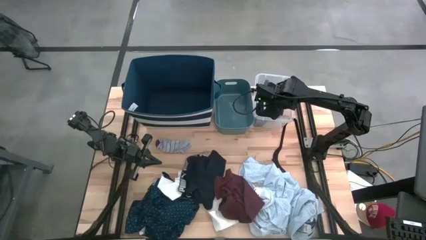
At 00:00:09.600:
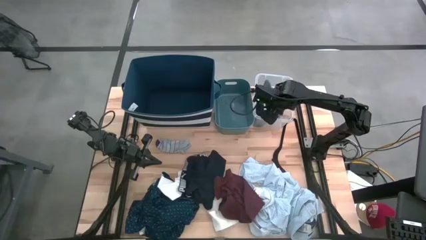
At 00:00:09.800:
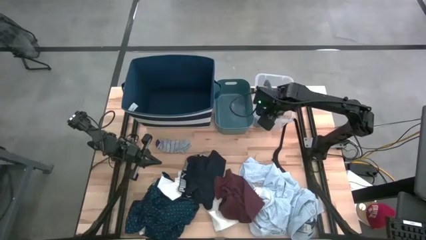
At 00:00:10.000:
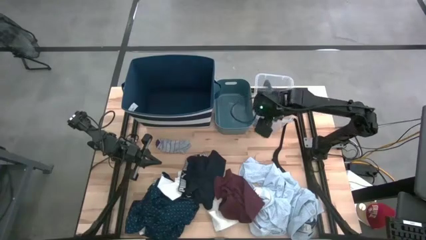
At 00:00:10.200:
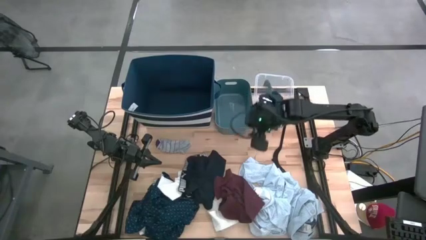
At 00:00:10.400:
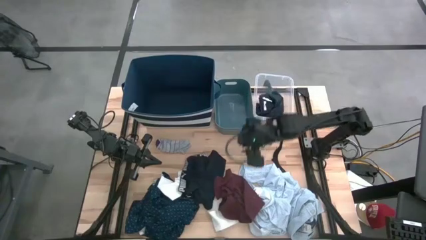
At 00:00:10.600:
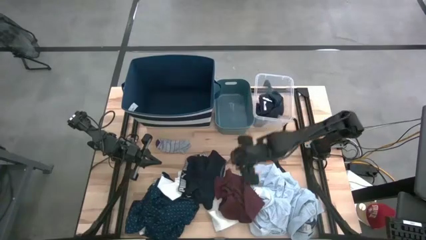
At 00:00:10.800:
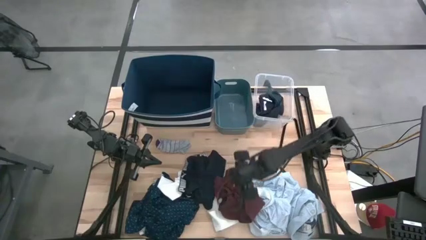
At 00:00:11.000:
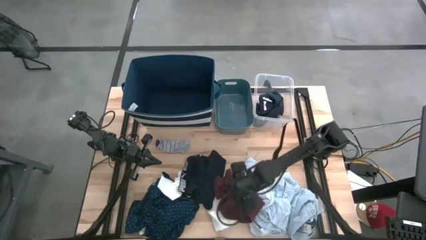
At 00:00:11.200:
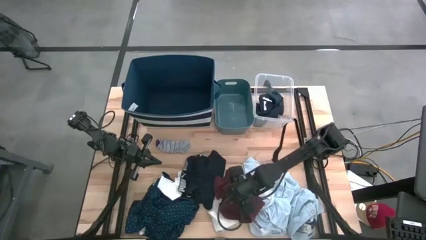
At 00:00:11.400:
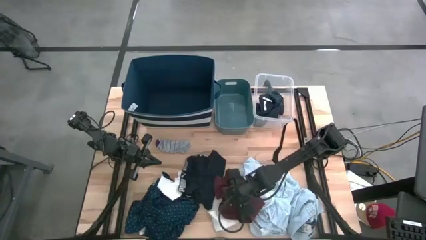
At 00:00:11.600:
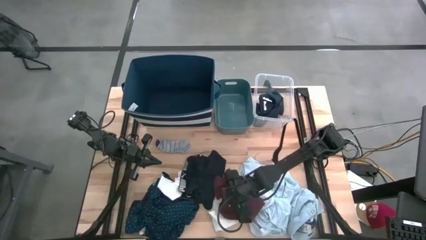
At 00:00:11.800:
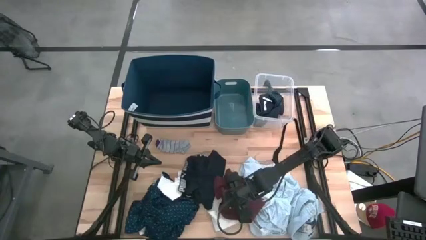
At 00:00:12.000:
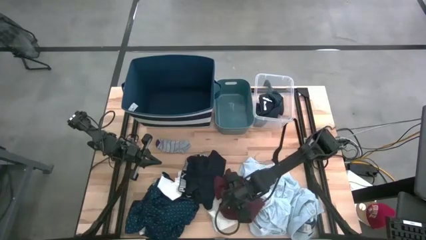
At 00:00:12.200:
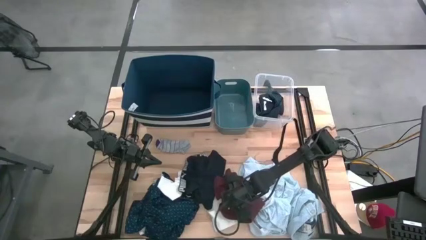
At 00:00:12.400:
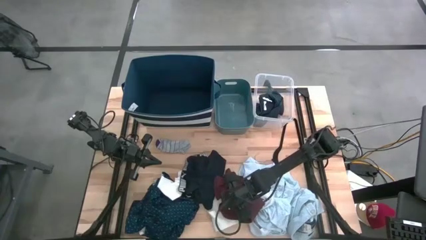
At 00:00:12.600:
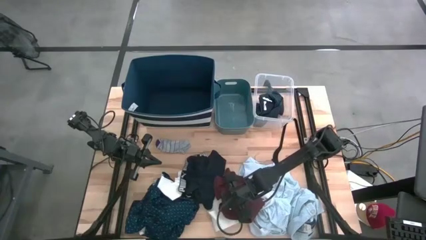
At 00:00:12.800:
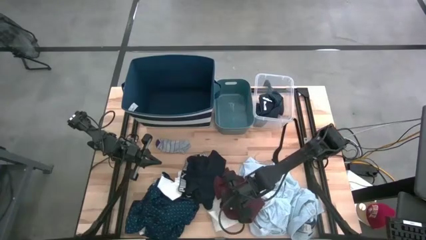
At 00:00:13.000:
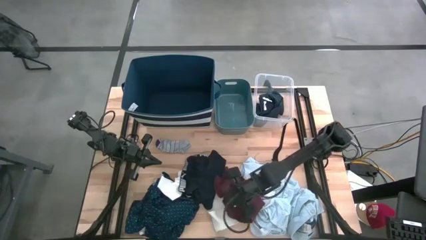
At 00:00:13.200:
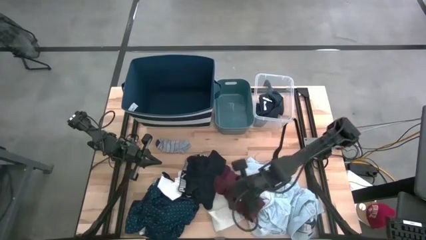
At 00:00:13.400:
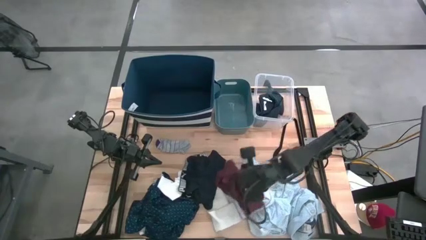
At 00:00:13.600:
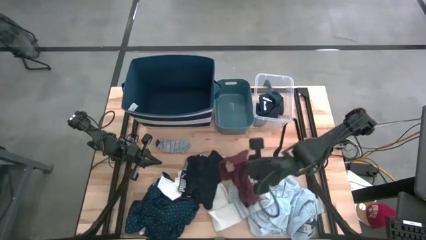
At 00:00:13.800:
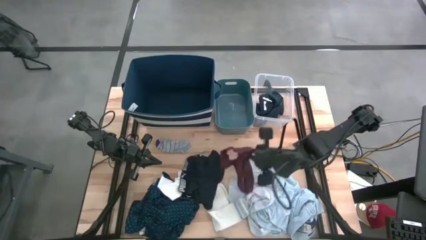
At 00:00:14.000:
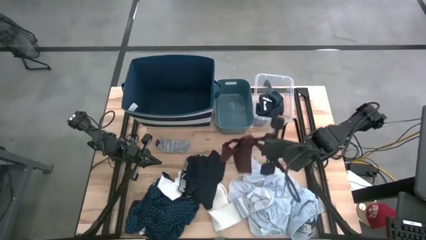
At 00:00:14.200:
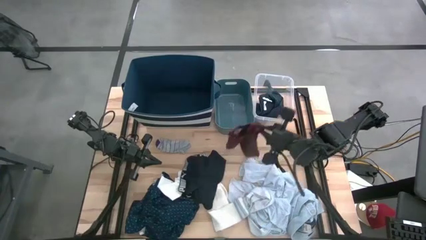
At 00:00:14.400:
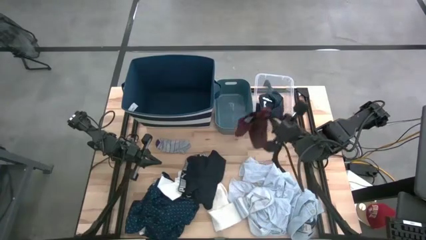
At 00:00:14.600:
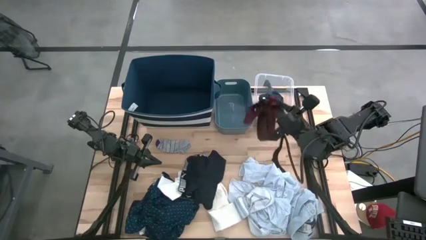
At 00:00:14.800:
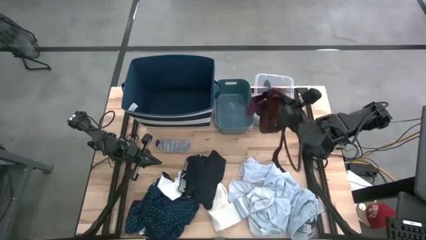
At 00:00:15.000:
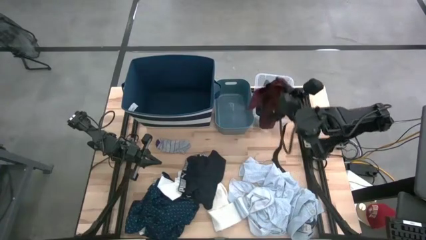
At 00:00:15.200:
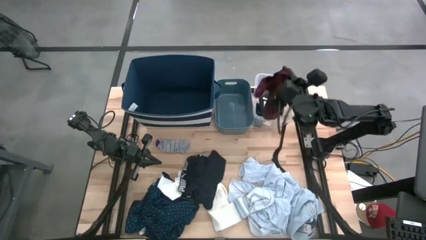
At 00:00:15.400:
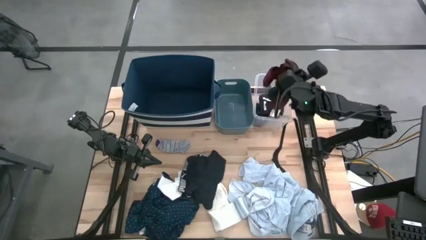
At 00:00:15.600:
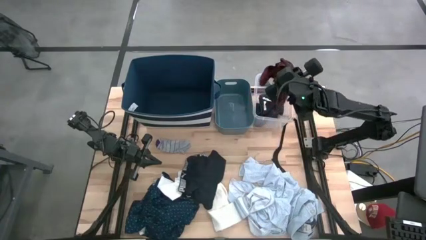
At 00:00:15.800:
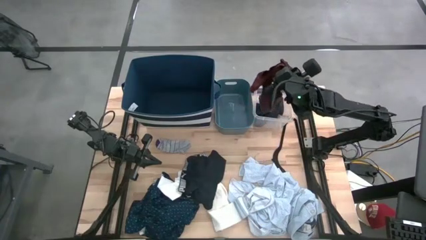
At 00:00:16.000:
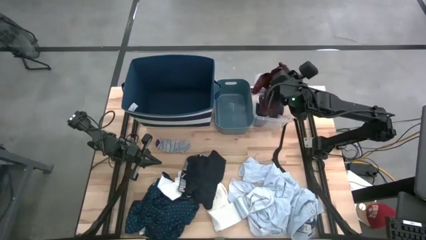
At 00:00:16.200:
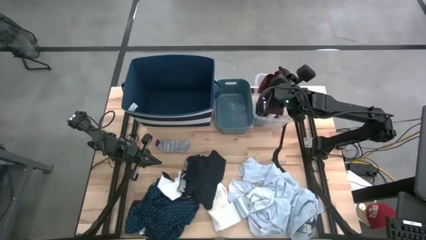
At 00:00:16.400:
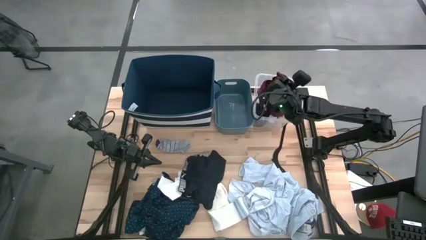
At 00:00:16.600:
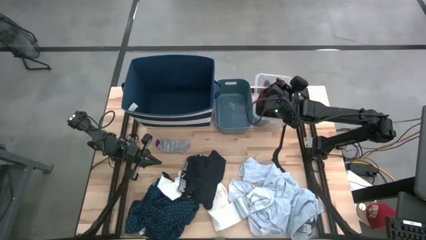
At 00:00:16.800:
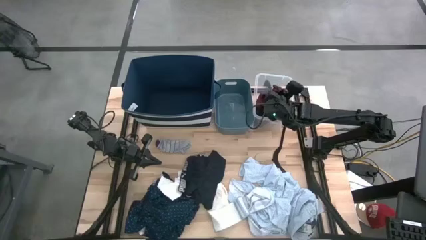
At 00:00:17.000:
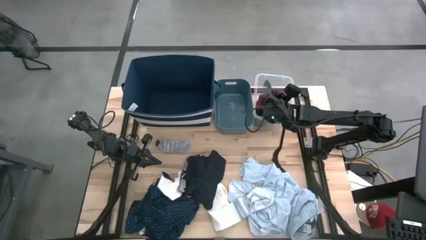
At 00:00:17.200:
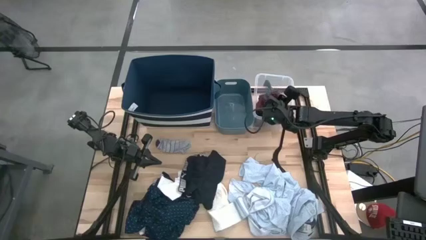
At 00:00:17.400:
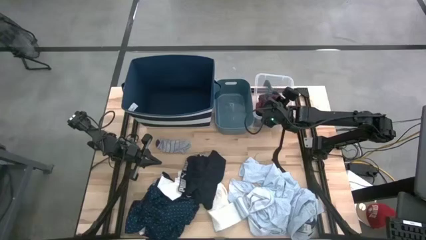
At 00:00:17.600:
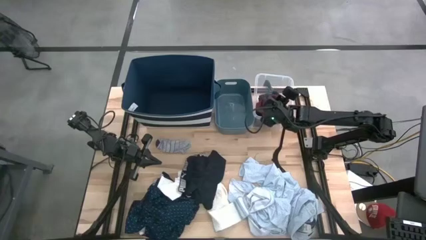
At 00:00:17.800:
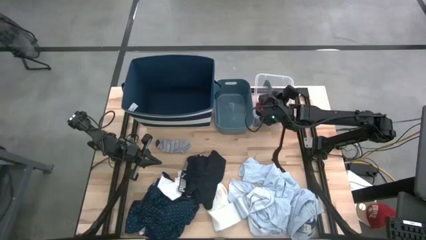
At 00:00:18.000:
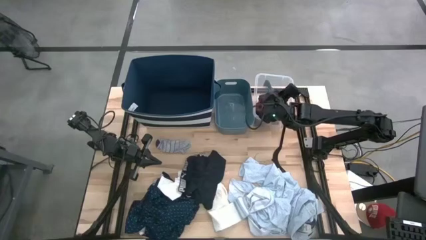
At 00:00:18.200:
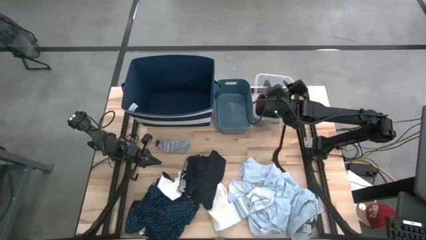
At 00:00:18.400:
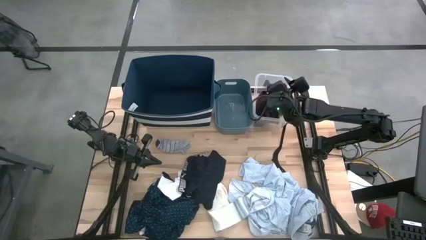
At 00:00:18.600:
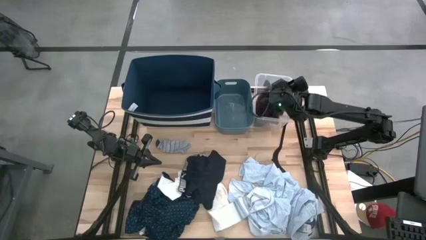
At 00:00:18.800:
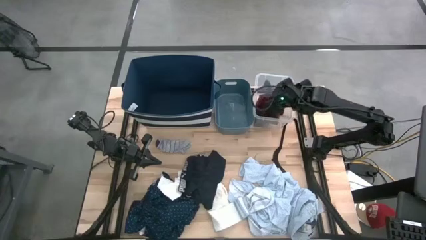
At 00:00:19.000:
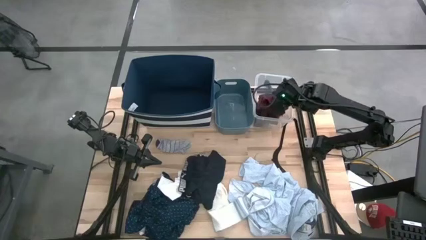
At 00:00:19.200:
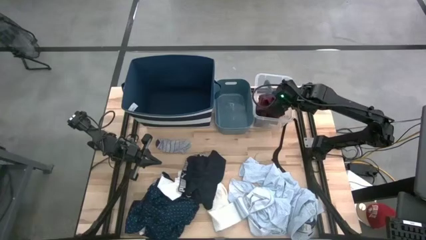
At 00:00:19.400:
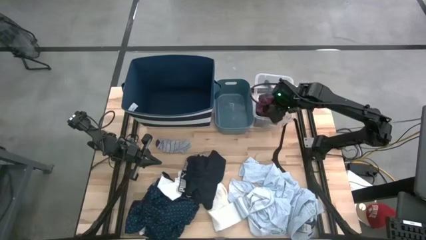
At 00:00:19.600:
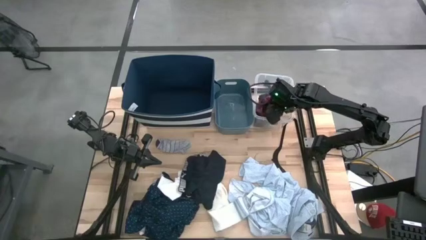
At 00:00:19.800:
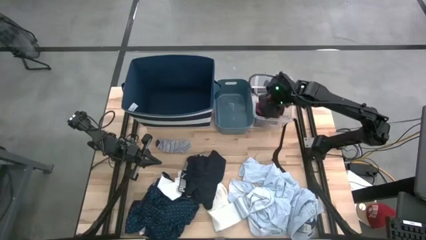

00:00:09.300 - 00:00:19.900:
Task: Pick & Place Cloths
Put the red boxer into the transparent bin

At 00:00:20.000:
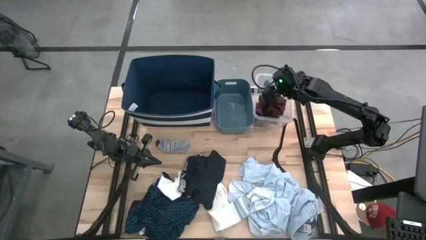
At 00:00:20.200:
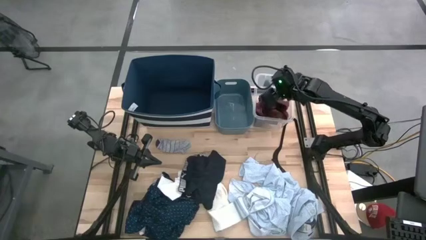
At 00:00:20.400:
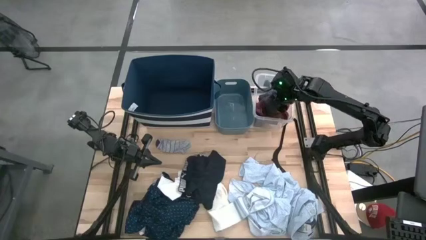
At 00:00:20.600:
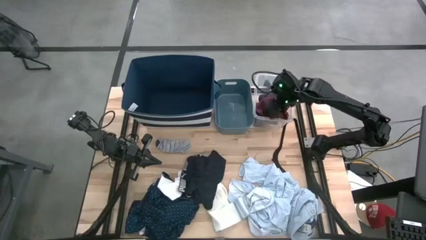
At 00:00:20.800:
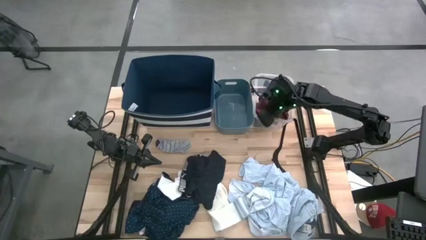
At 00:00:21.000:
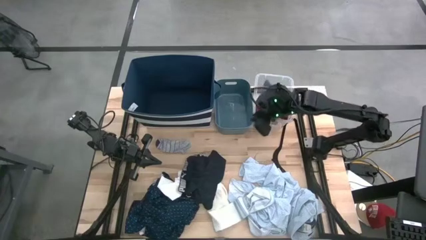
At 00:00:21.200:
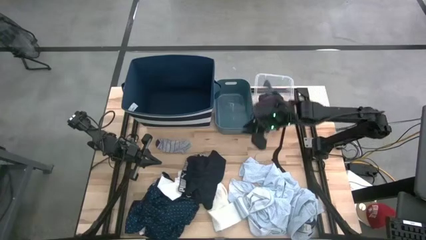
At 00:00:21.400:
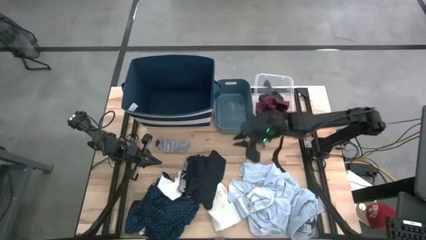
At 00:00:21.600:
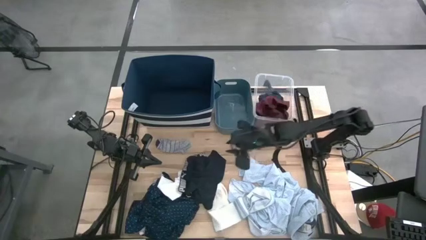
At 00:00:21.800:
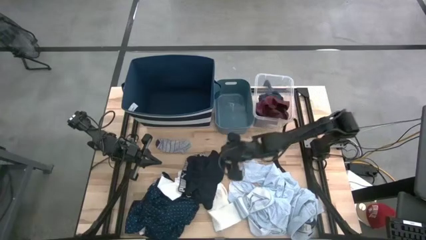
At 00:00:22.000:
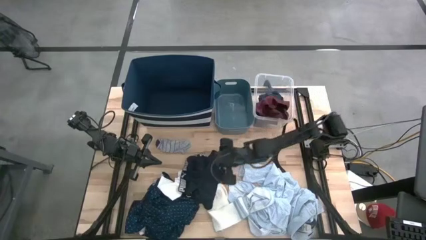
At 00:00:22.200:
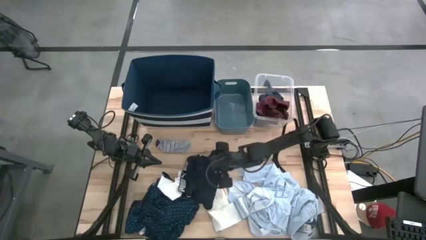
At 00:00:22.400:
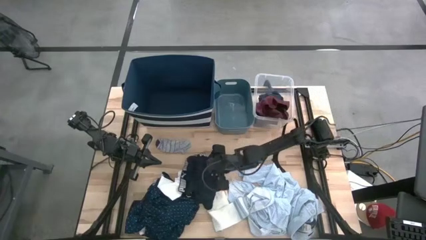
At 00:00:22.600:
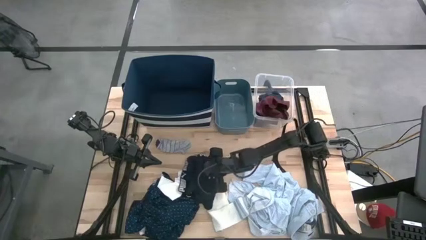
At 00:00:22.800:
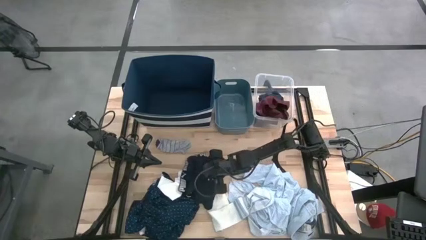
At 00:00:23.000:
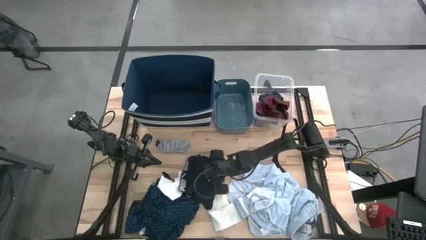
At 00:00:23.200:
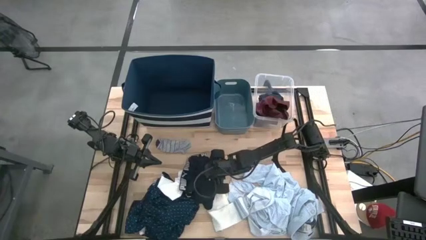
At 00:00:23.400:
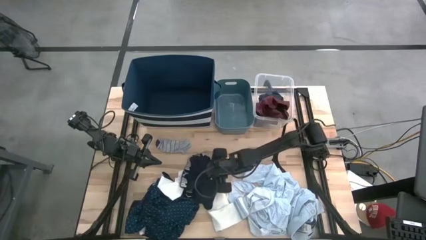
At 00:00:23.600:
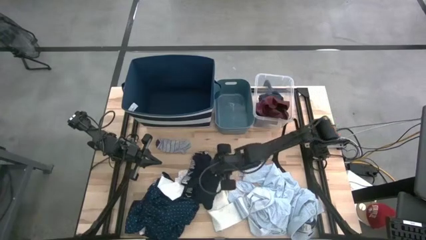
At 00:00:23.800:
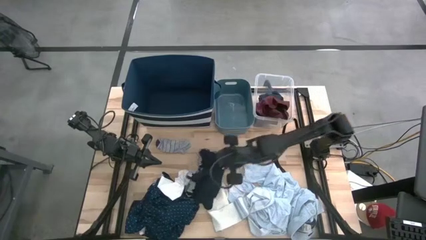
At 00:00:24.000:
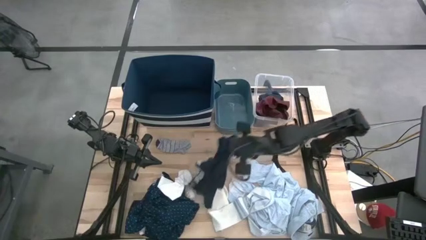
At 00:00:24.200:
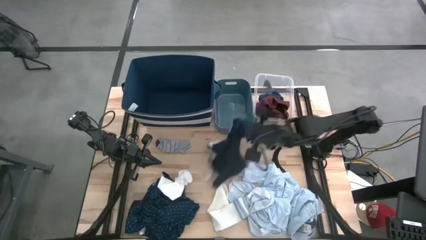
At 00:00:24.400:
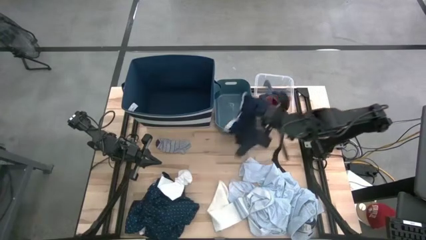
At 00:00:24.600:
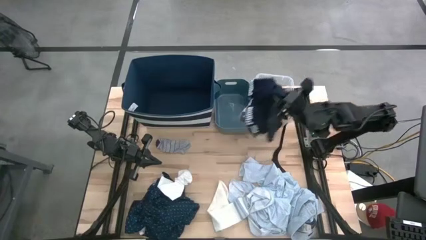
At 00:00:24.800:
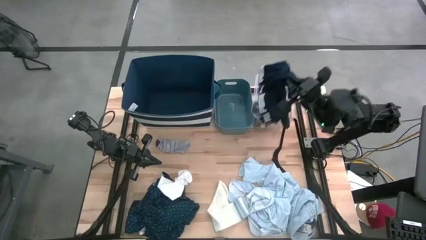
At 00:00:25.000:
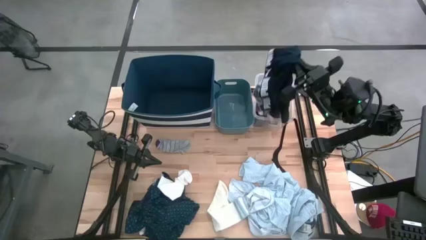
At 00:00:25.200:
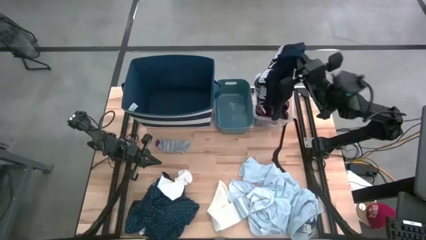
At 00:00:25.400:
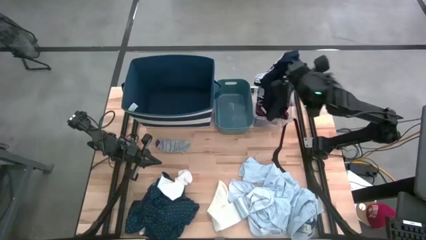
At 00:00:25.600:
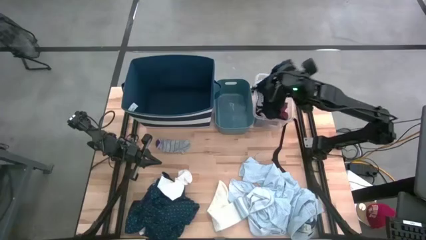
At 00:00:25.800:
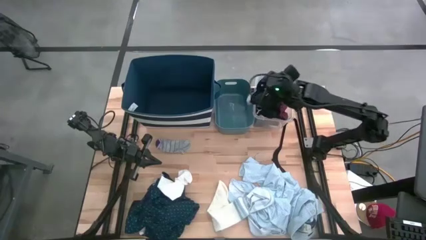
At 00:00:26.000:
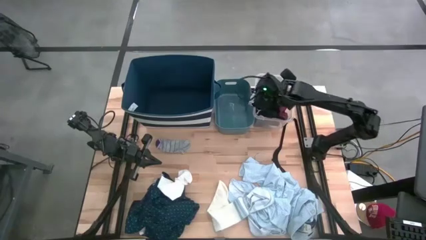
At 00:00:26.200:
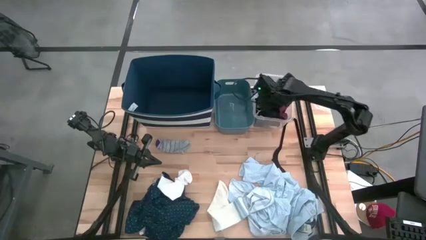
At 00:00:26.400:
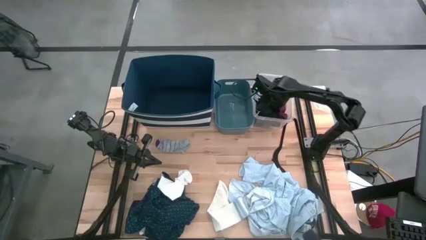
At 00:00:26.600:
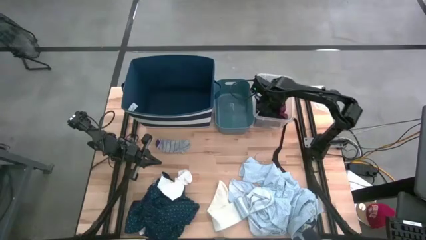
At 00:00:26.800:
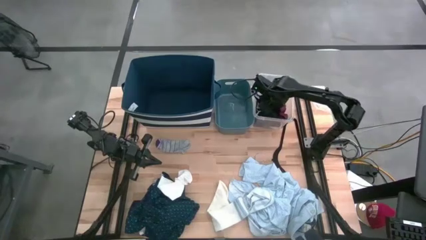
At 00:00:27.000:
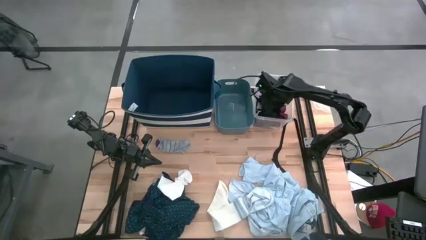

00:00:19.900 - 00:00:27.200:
Put the black boxer into the transparent bin
